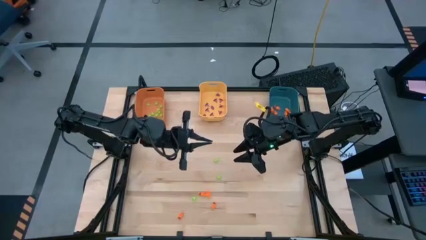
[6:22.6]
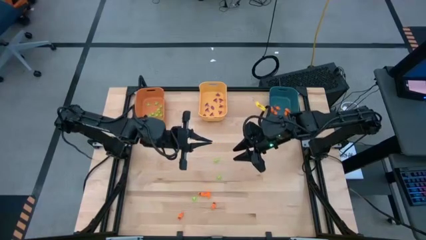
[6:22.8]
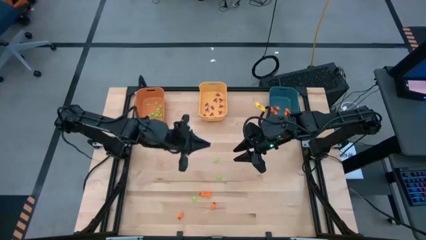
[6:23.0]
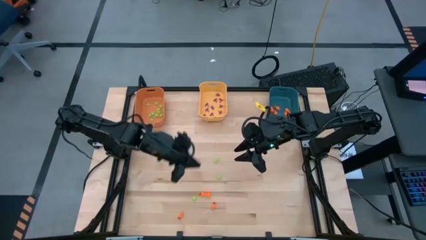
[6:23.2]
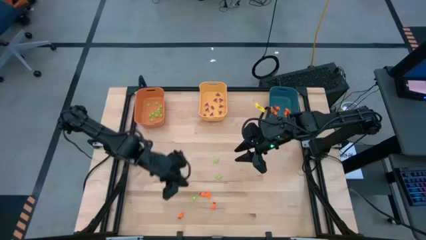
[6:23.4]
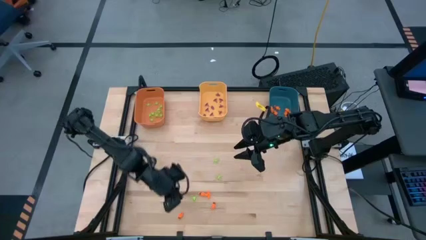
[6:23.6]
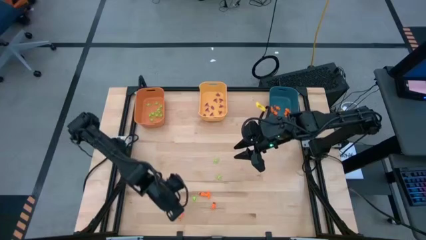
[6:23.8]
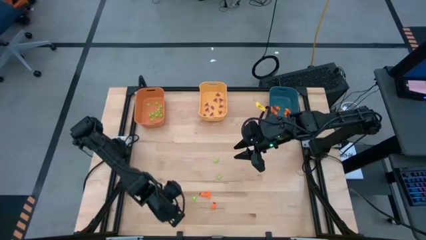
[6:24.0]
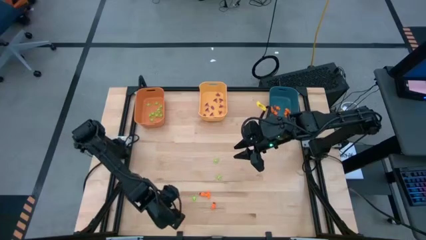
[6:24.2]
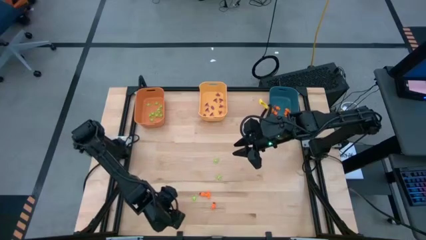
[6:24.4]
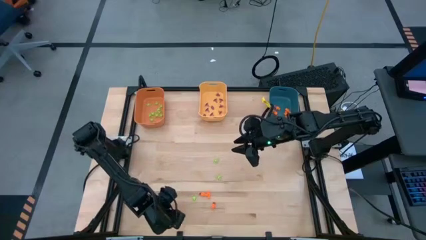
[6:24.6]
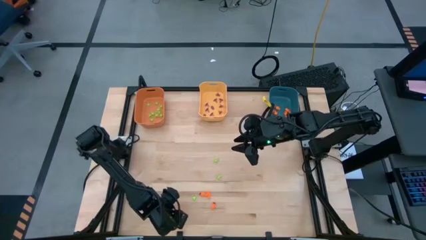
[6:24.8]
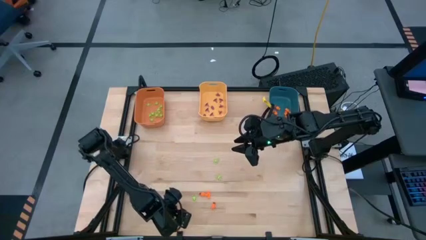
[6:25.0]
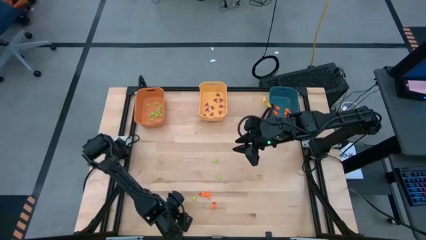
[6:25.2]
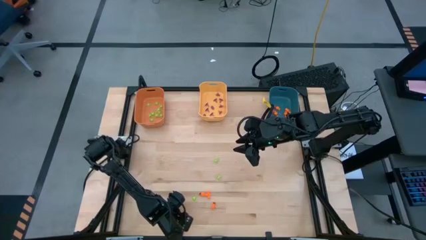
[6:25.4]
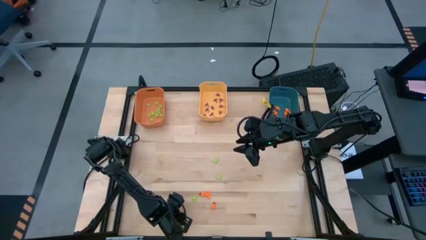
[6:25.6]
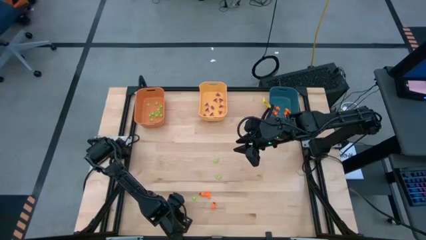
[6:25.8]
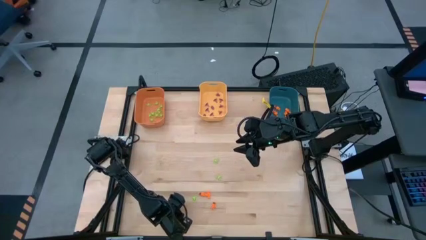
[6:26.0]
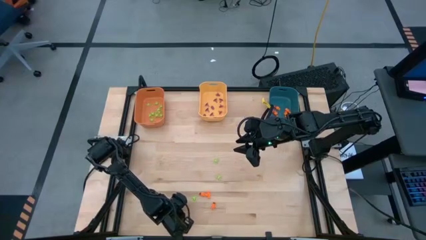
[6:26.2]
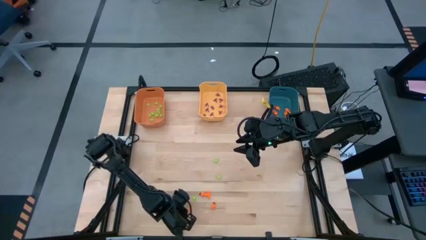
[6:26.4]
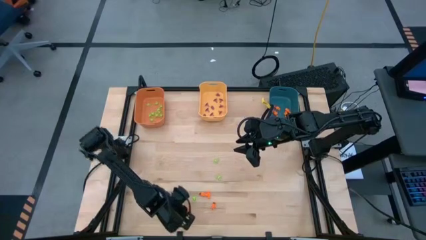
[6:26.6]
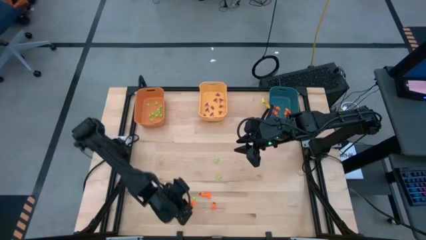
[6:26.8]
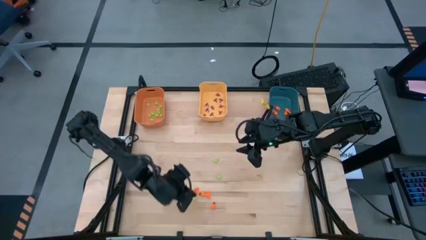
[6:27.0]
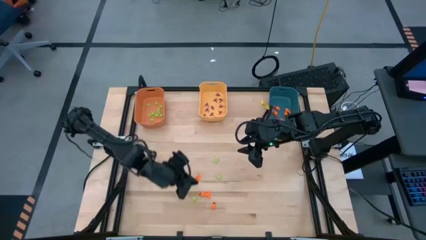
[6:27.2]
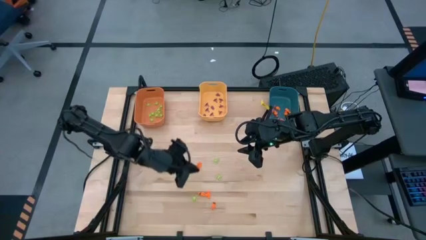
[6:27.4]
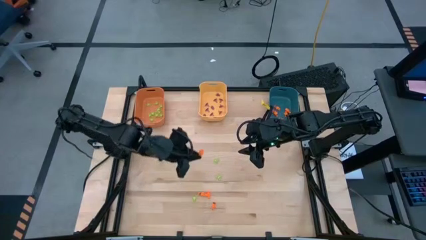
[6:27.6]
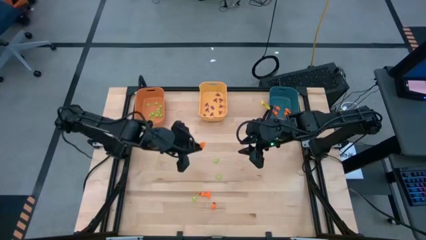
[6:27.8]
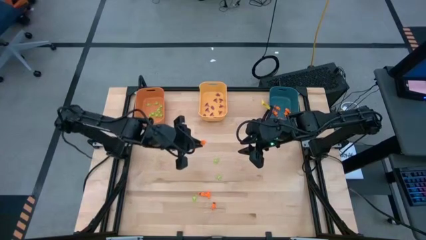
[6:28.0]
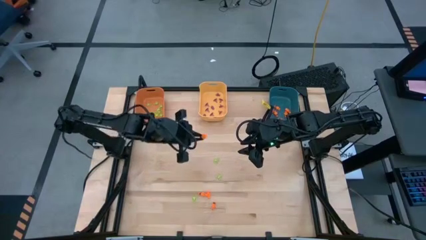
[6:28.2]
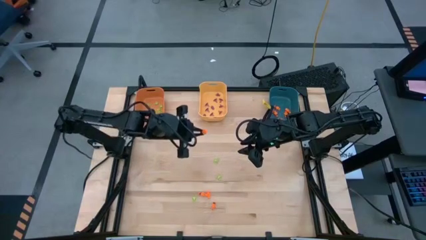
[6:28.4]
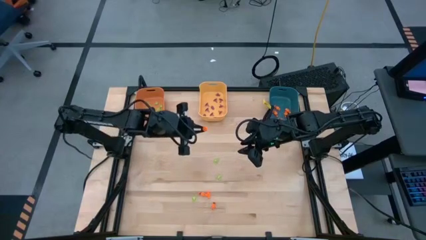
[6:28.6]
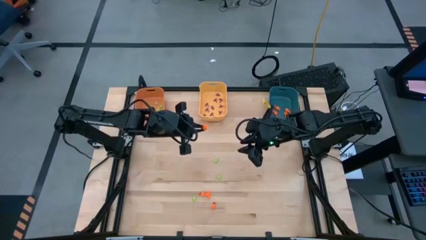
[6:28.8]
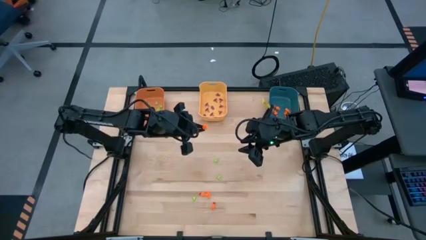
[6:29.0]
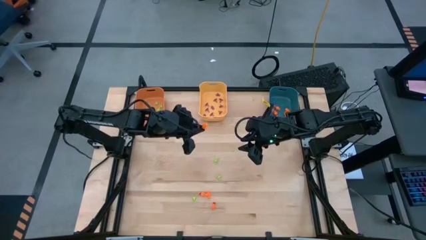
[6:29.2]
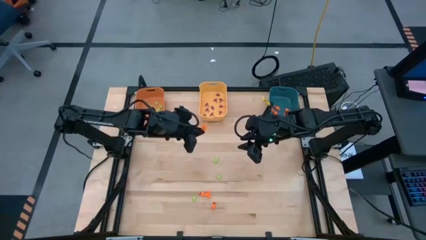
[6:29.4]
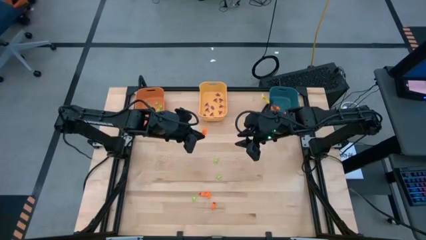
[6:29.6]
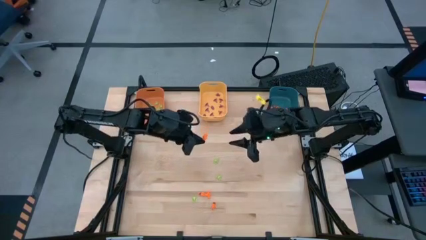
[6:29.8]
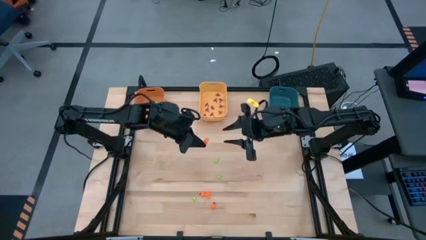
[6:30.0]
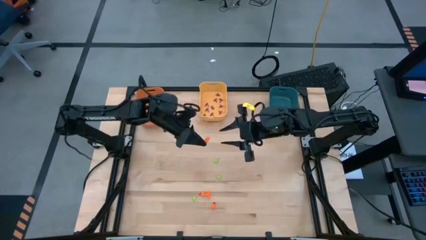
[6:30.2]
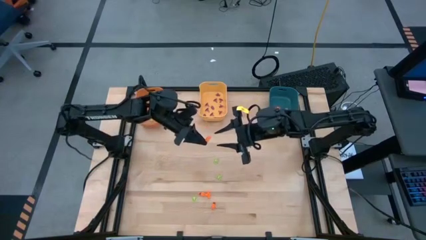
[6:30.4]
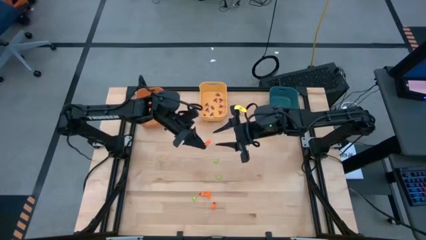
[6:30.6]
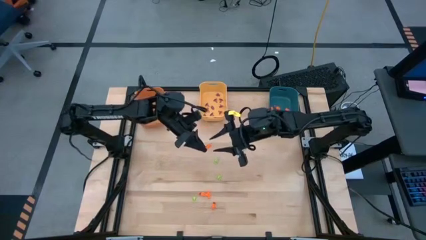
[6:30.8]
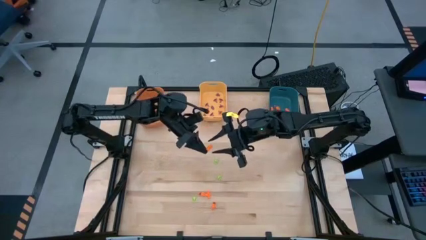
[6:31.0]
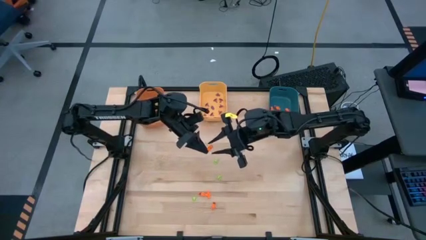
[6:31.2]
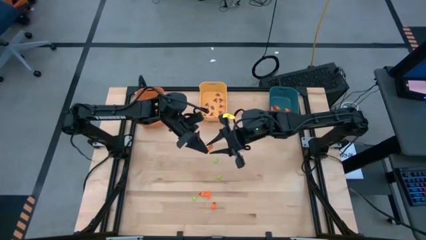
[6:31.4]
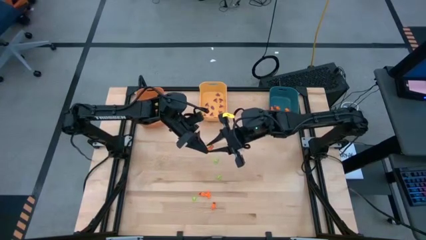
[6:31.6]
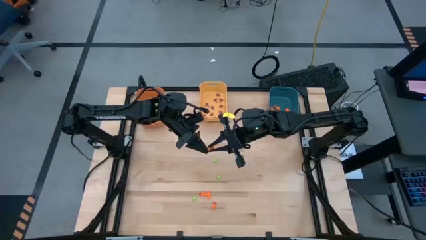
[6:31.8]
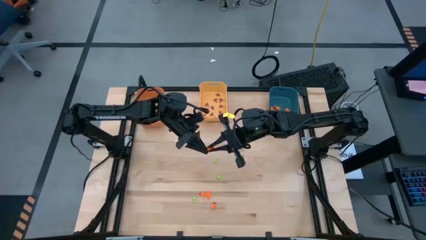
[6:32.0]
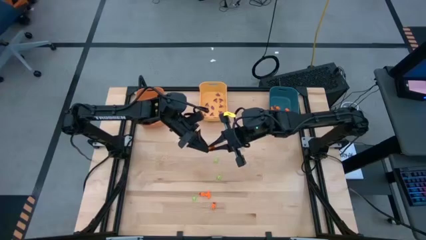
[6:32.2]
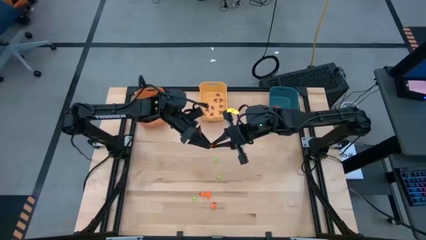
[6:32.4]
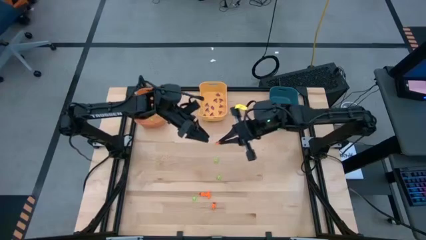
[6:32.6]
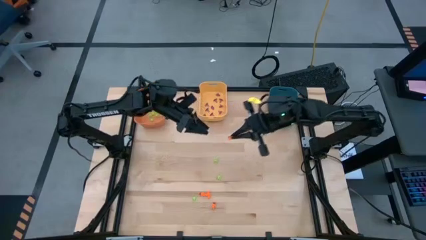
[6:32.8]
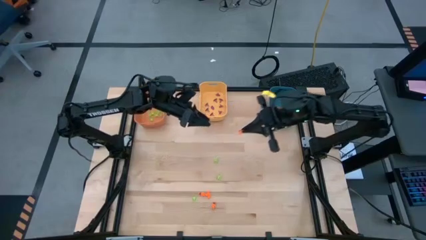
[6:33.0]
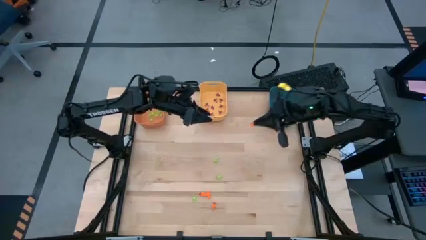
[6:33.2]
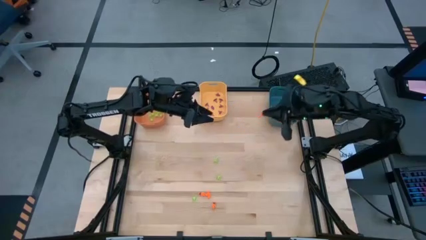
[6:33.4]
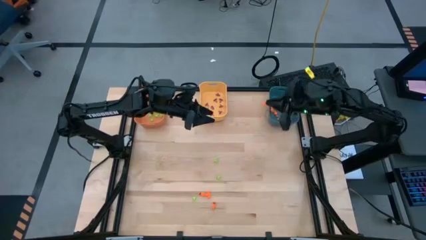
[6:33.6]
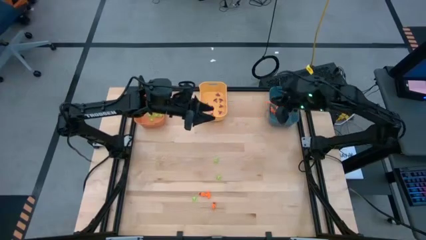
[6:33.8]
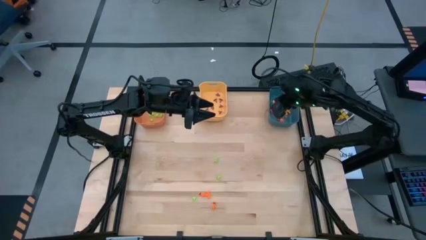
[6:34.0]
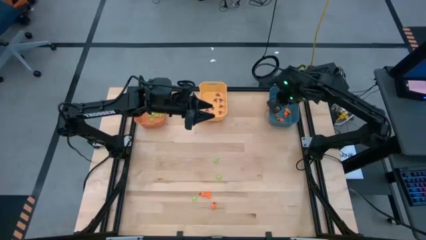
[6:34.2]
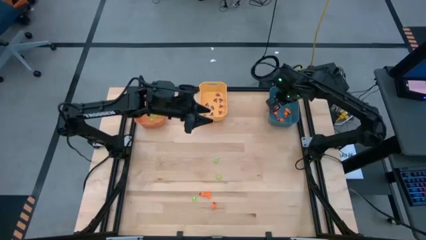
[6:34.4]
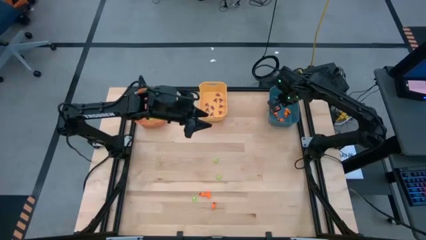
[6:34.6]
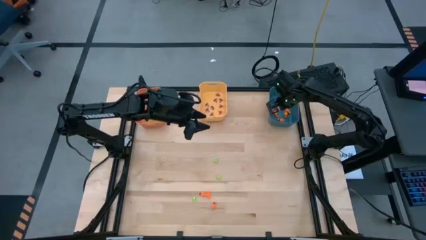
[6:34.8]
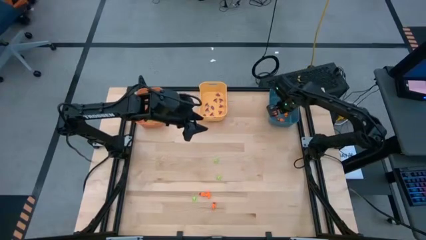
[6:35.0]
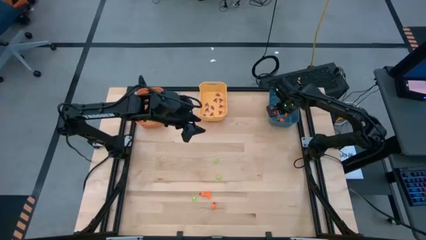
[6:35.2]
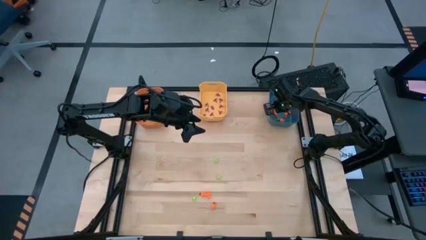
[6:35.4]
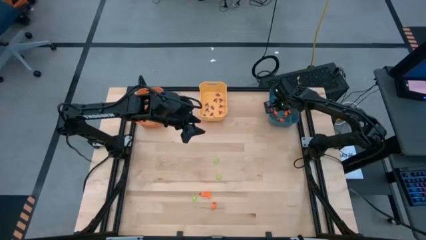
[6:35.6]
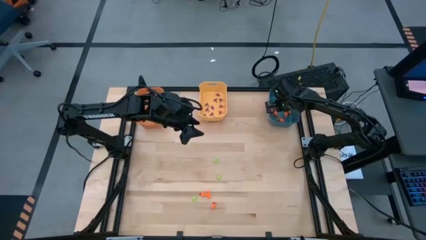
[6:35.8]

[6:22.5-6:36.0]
Task: Sort Halloween decoration
Put the orange skeleton toy into the blue bin

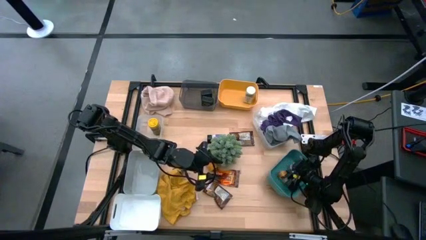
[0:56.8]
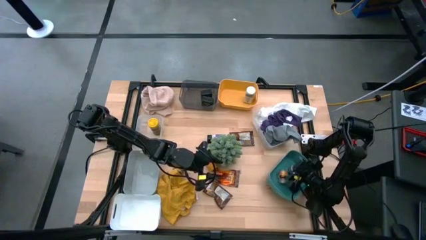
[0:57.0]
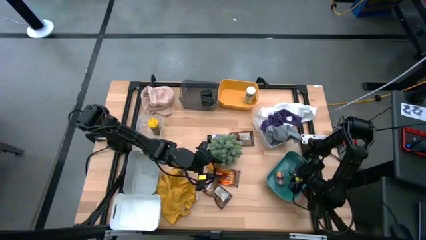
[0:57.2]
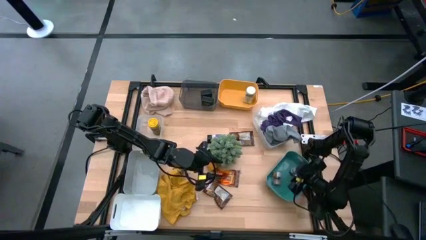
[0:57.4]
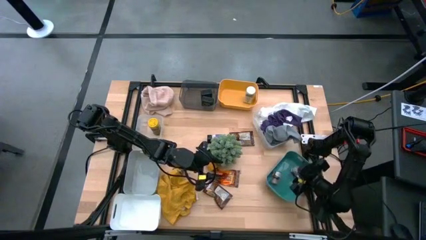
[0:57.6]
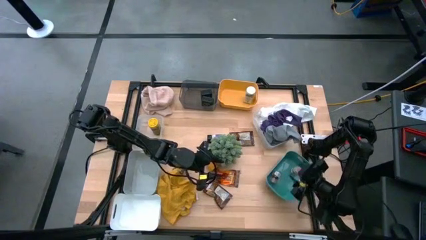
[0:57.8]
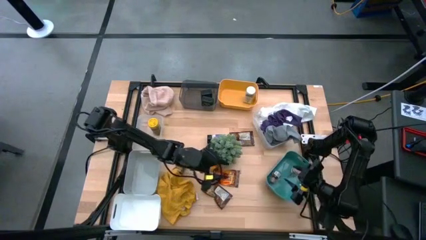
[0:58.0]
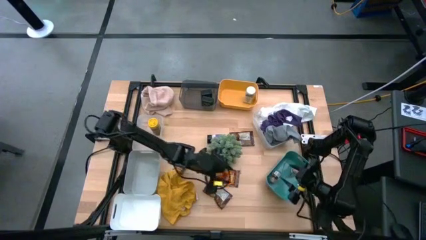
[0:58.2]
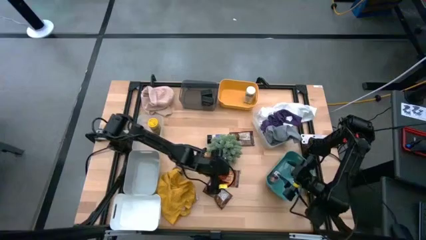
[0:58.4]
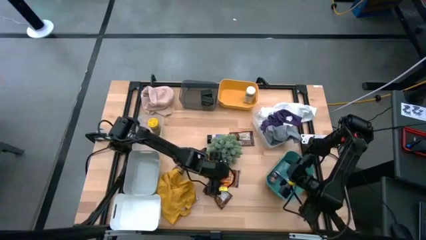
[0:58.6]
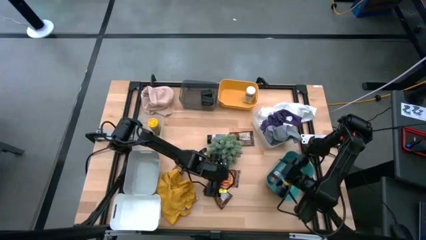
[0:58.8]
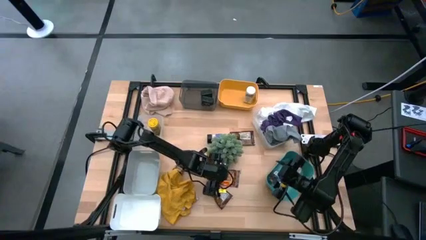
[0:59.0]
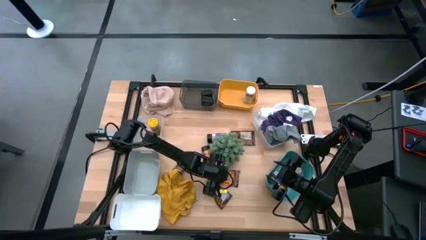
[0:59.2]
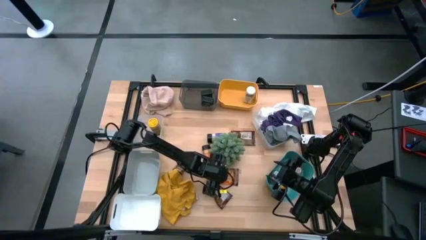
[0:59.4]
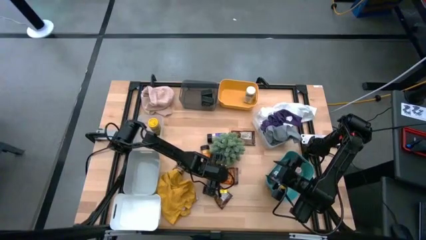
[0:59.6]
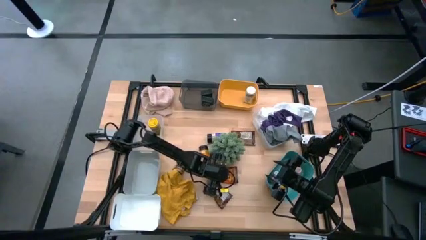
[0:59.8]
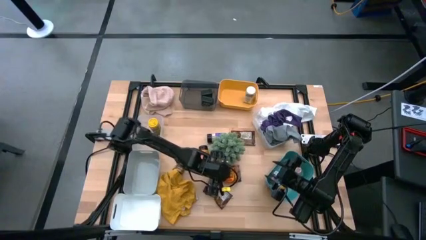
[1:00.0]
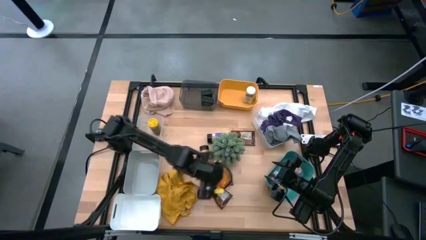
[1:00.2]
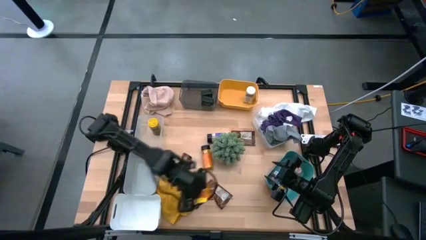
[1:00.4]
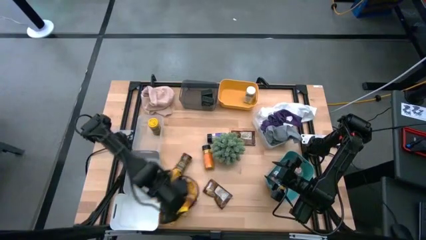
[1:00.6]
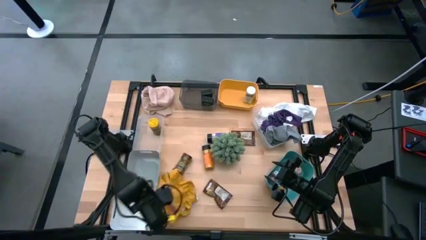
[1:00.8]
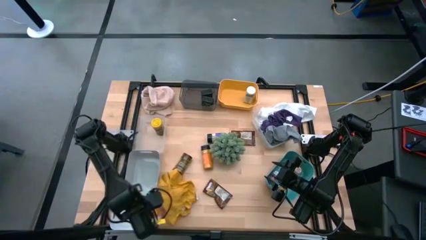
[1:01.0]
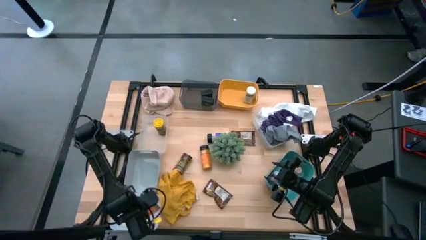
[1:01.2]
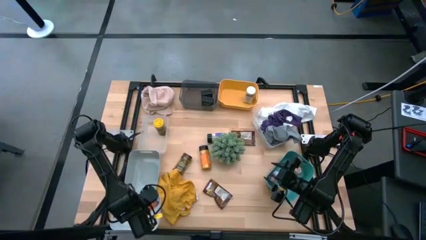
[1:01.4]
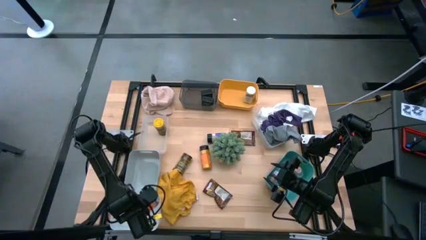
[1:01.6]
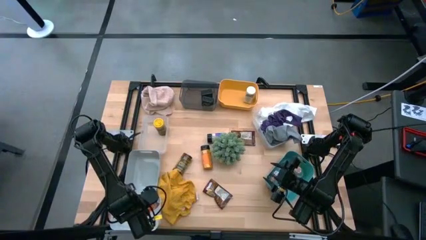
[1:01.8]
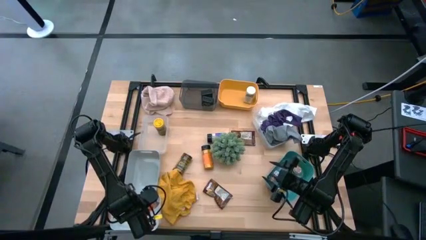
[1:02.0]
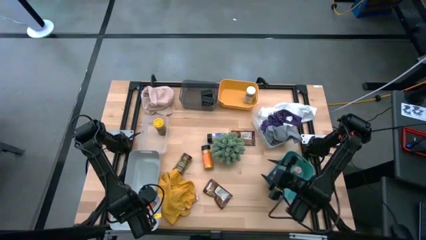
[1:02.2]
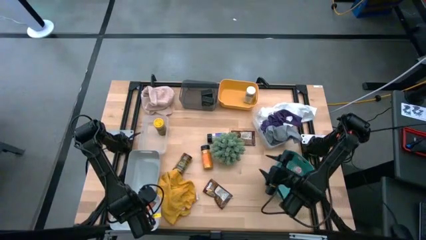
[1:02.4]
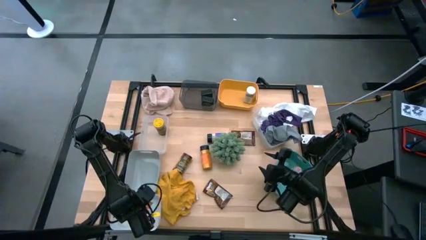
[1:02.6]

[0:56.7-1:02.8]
Task: Sort spices by type
Put the orange spice pack into the bottom white bin
